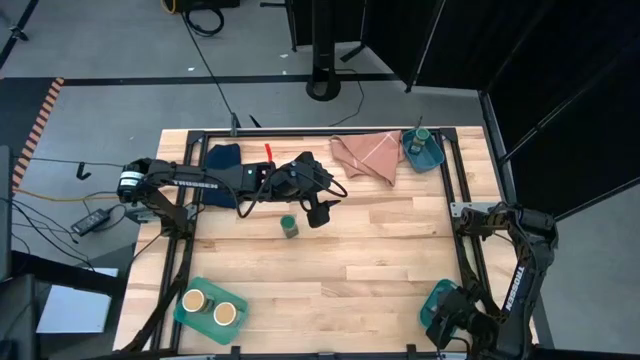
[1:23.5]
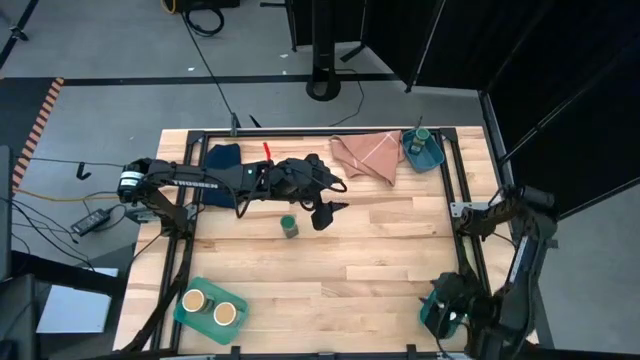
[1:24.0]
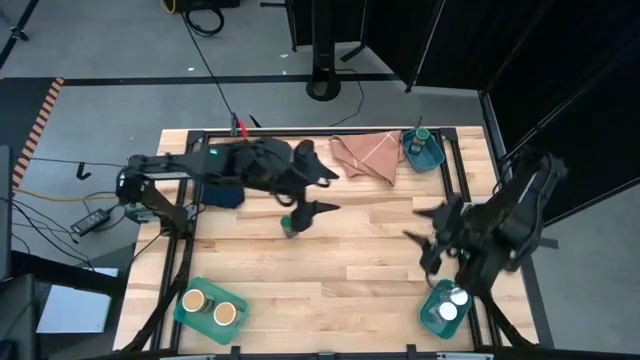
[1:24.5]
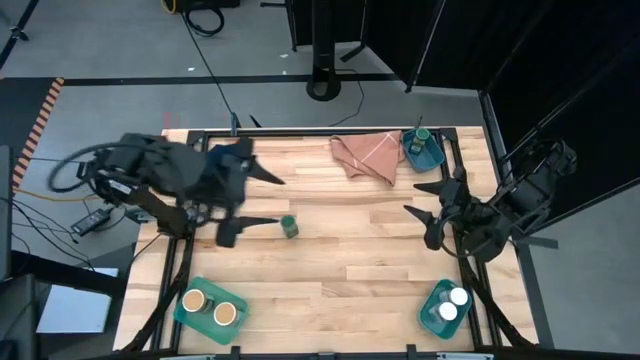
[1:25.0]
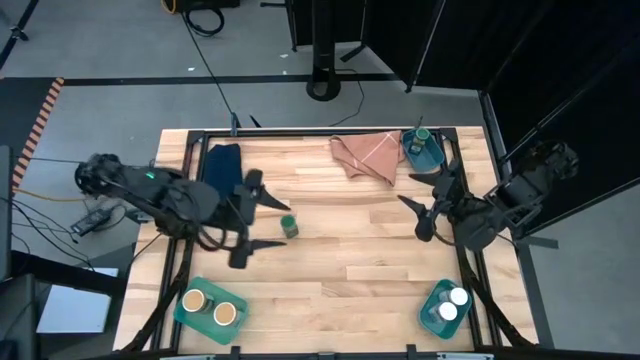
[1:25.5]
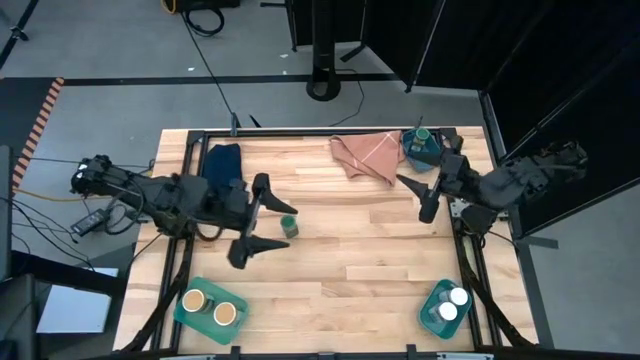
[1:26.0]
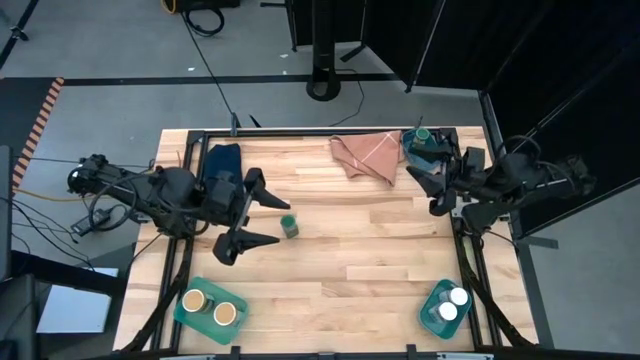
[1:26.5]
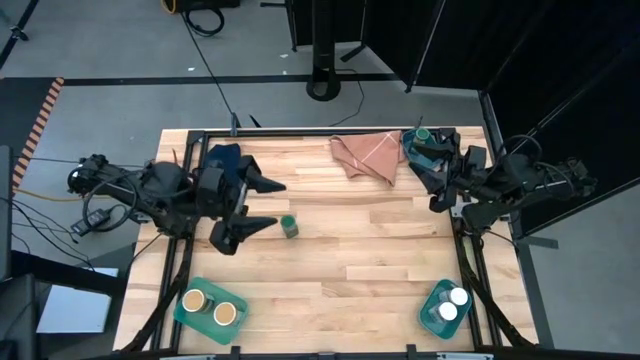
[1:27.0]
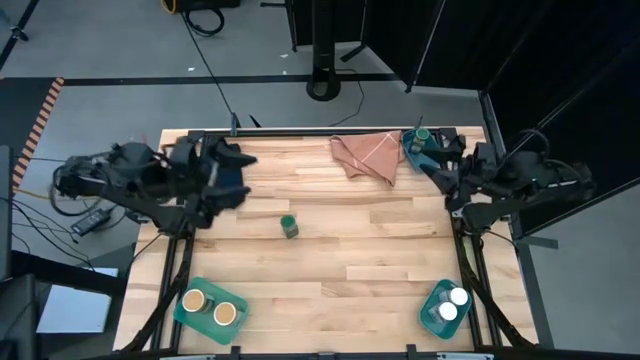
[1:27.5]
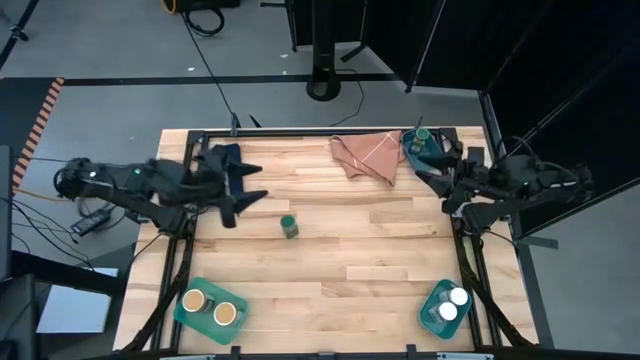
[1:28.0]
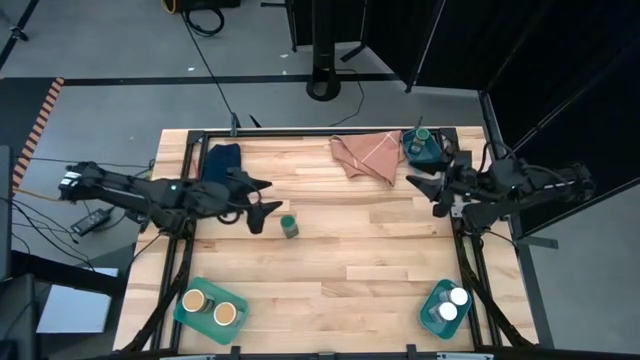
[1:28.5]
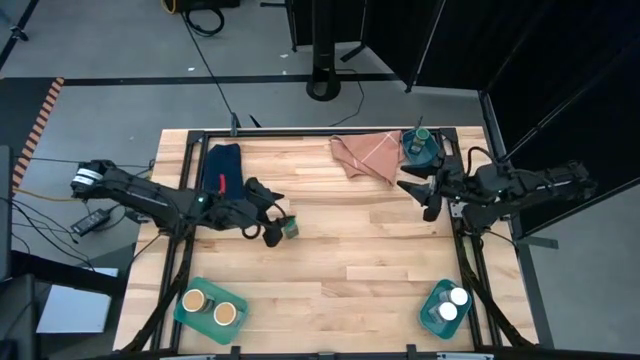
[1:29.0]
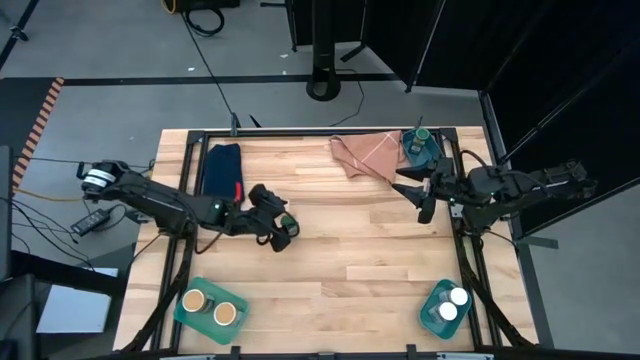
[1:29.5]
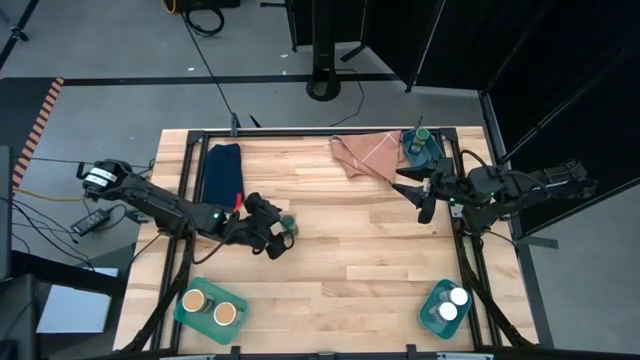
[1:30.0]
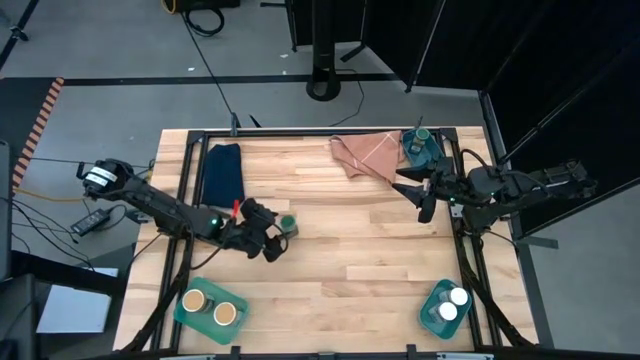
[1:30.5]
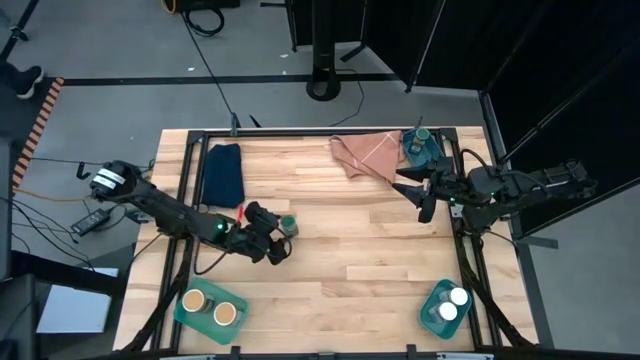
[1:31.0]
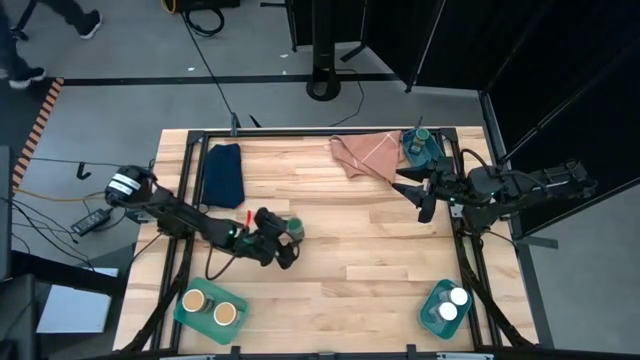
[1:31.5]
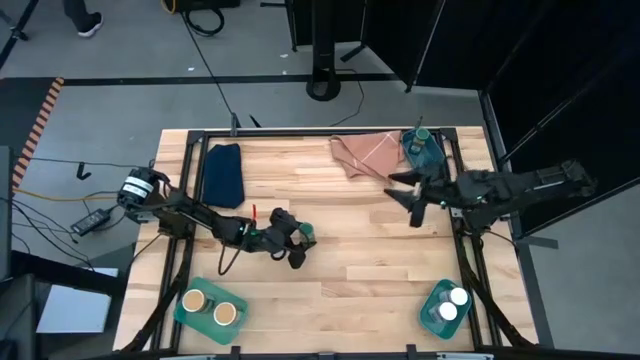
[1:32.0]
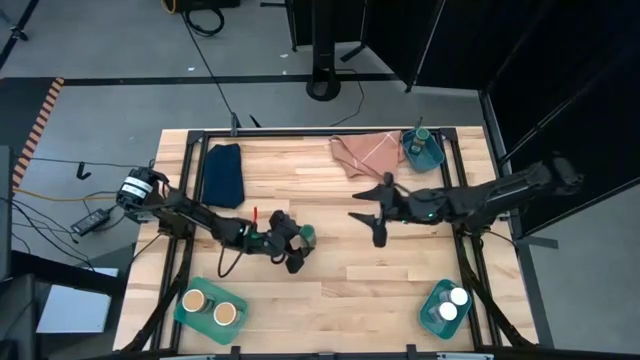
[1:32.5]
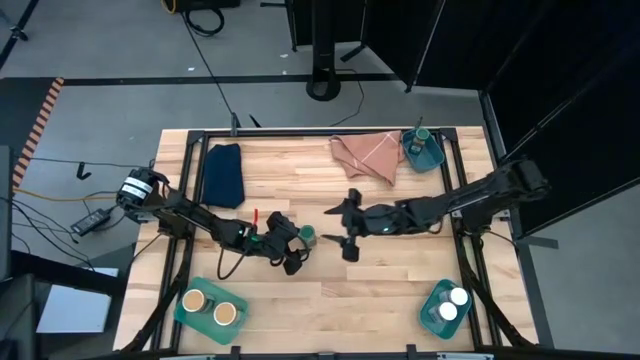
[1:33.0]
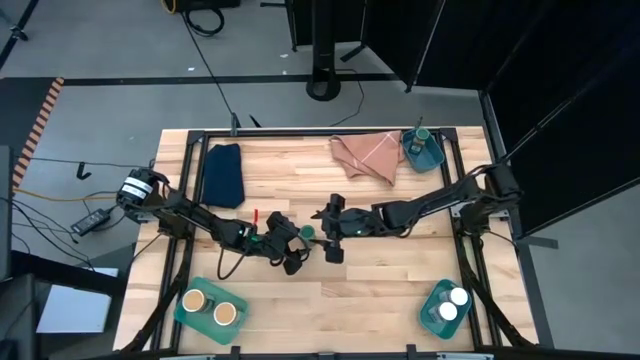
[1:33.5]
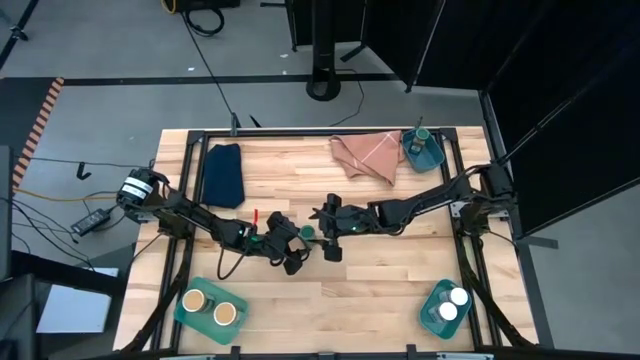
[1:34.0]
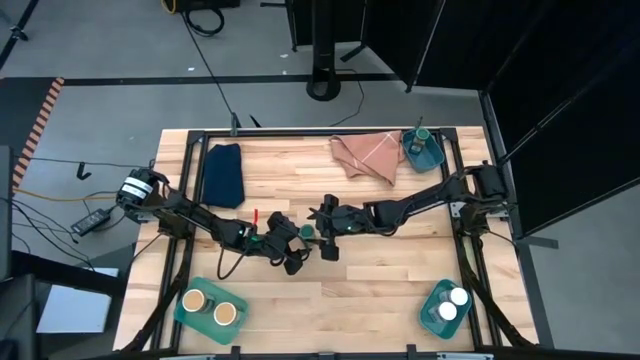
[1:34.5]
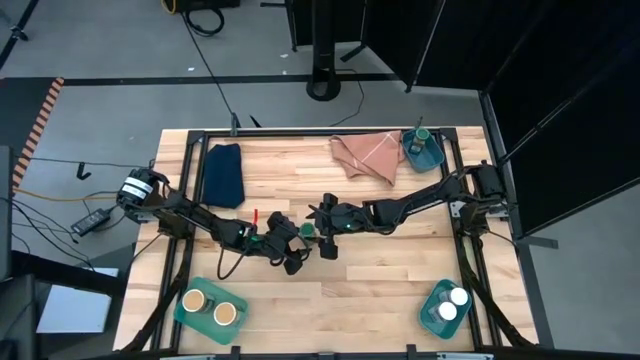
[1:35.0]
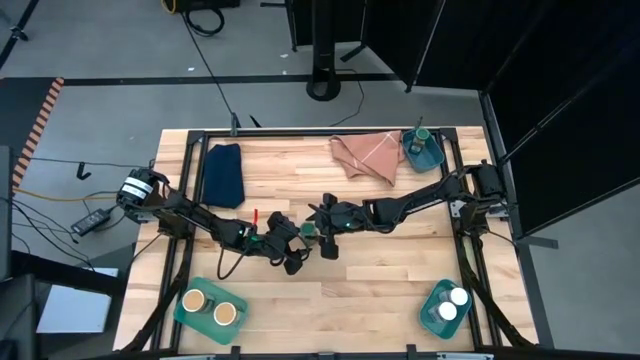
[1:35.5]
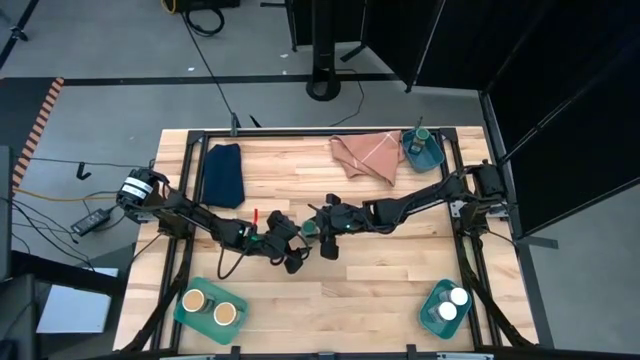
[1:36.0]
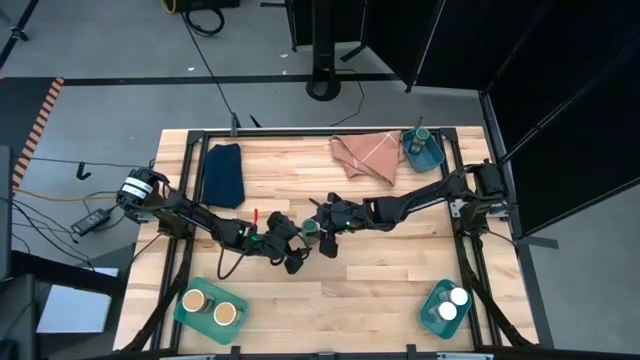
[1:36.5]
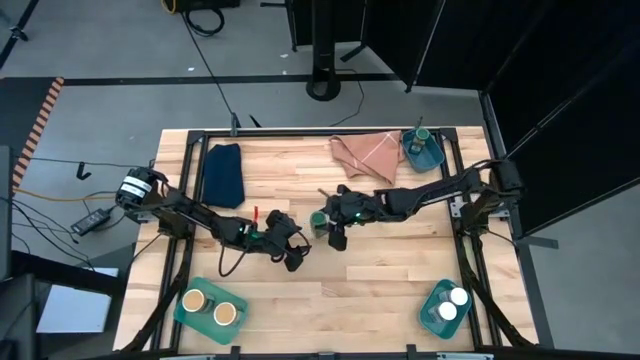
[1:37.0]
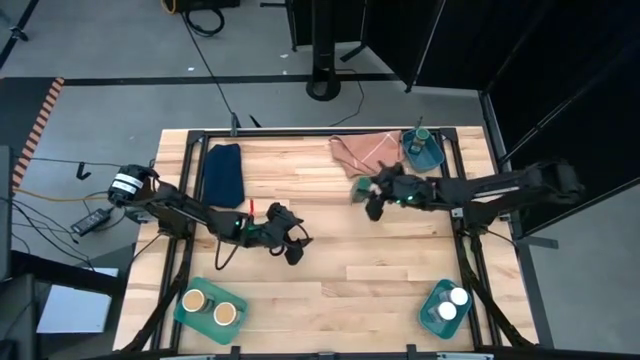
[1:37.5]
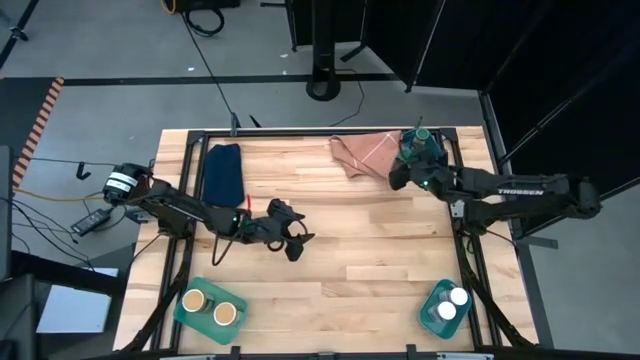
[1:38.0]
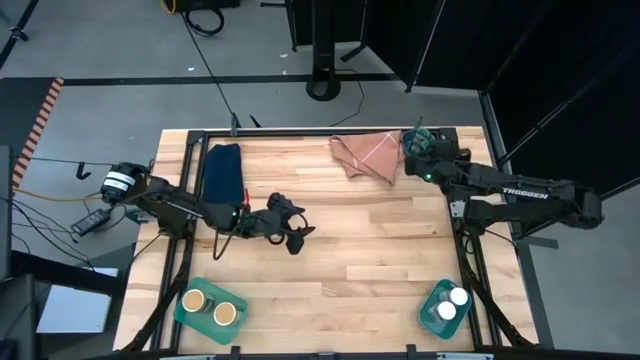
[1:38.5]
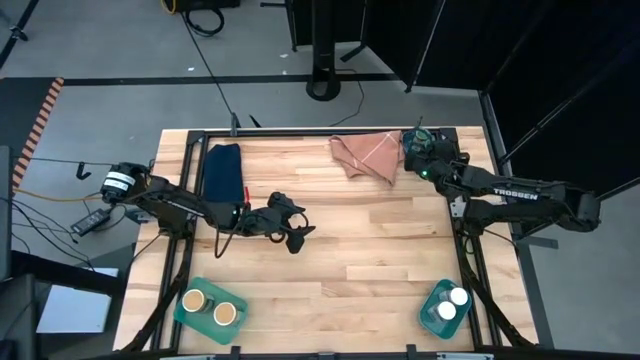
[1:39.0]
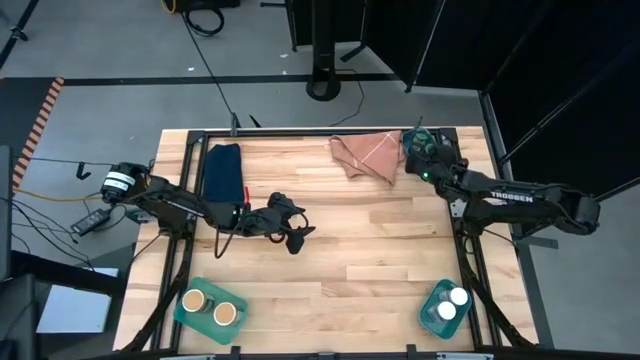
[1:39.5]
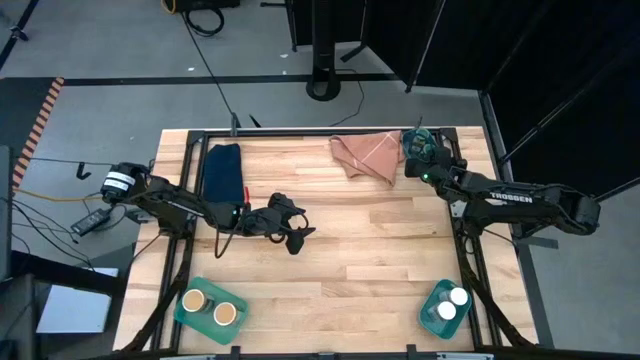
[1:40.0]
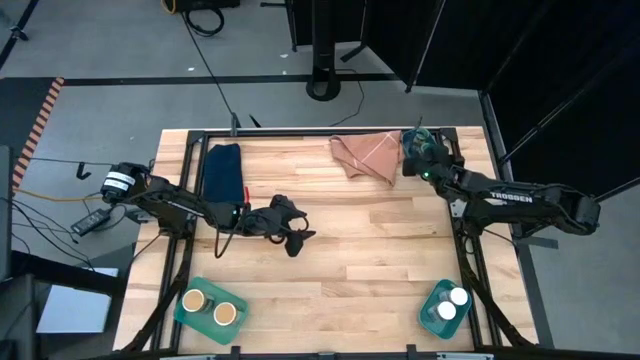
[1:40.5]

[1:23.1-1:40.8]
Task: Sort spices by type
Put the green seasoning bottle into the blue bin
